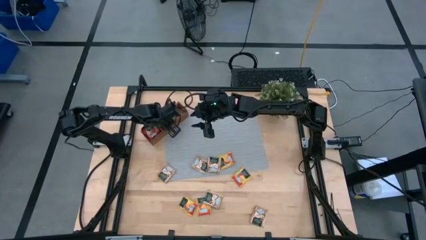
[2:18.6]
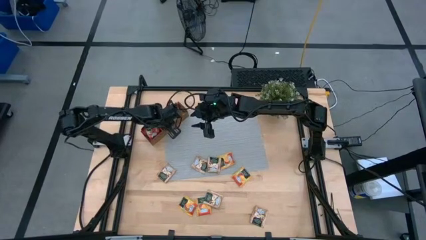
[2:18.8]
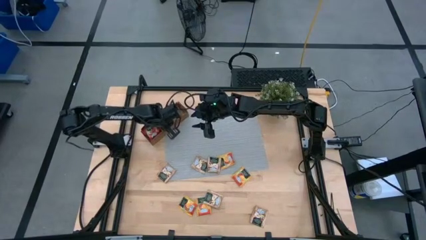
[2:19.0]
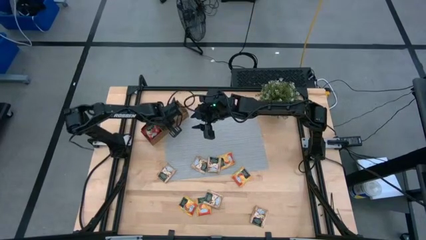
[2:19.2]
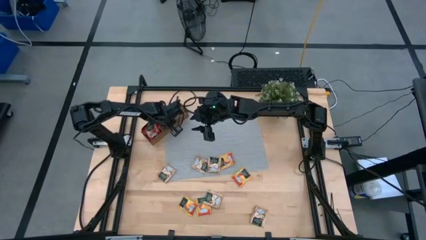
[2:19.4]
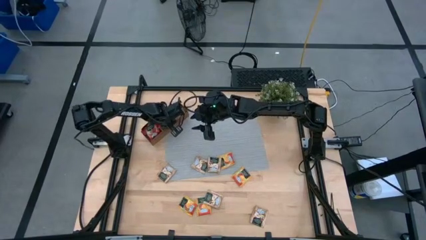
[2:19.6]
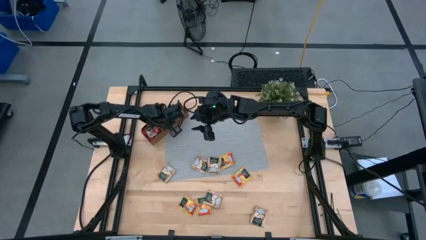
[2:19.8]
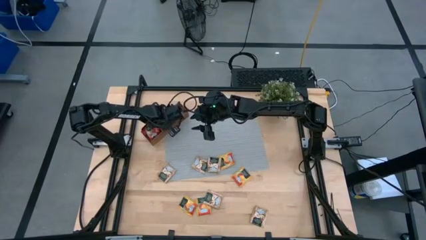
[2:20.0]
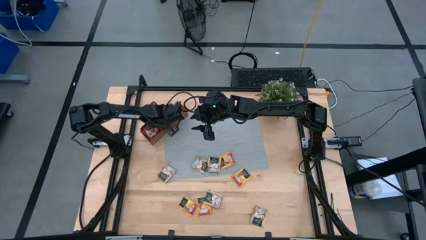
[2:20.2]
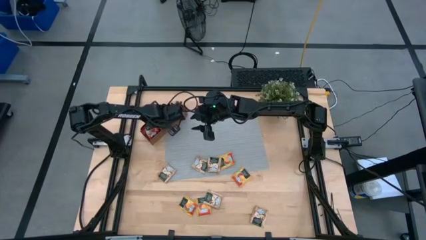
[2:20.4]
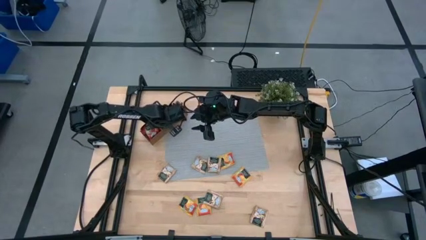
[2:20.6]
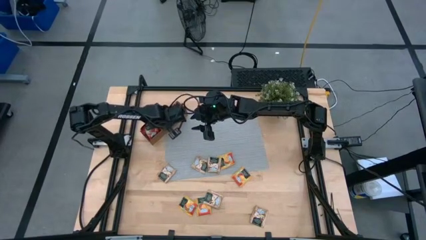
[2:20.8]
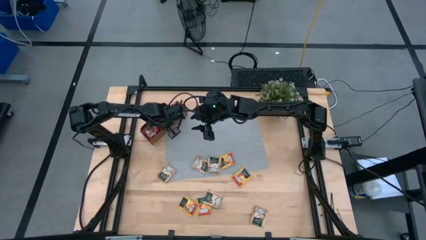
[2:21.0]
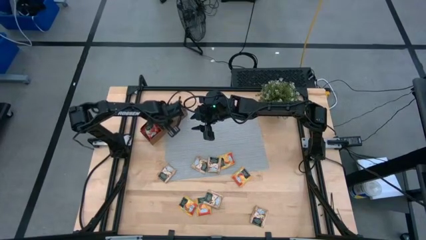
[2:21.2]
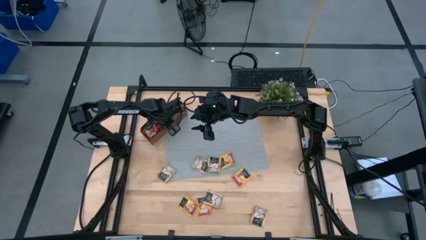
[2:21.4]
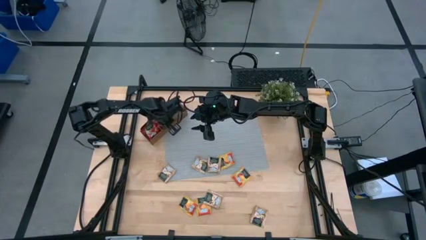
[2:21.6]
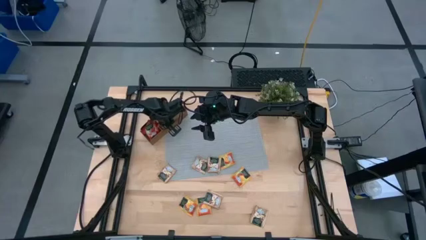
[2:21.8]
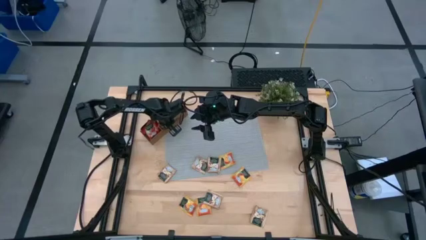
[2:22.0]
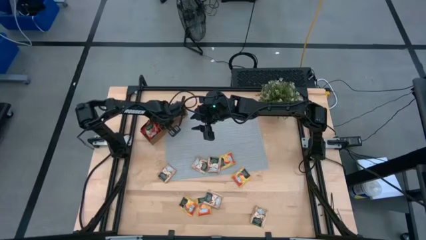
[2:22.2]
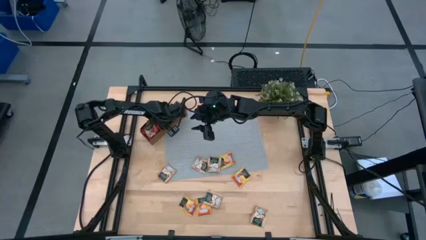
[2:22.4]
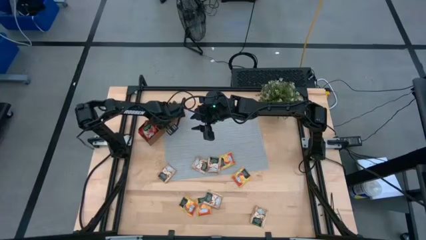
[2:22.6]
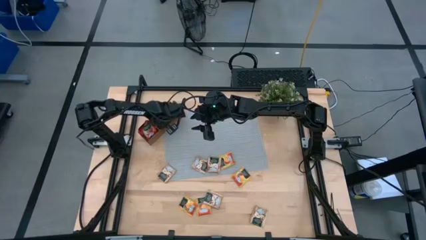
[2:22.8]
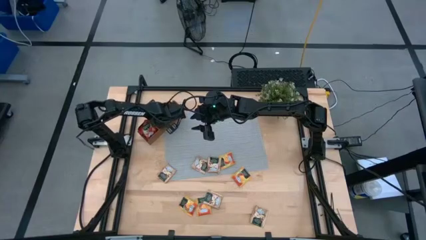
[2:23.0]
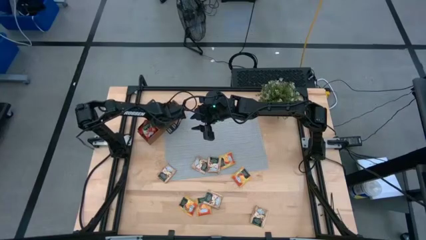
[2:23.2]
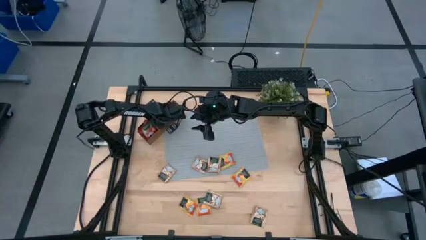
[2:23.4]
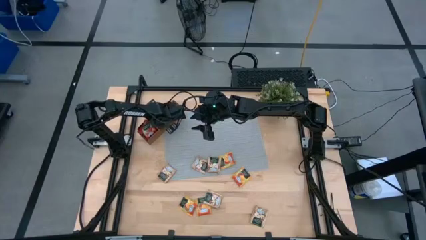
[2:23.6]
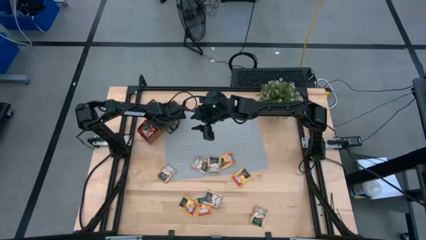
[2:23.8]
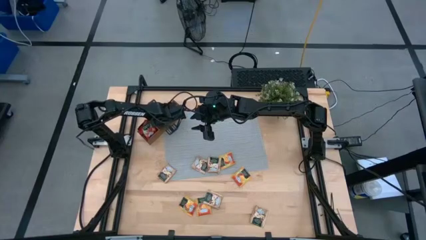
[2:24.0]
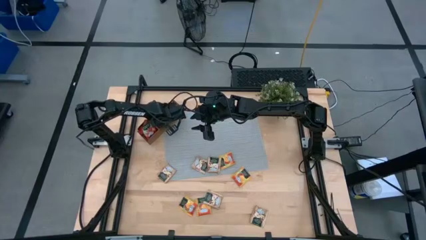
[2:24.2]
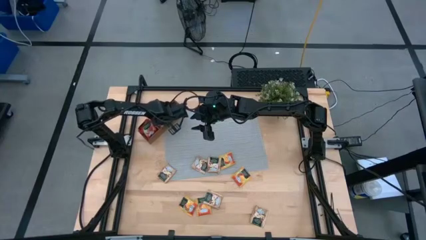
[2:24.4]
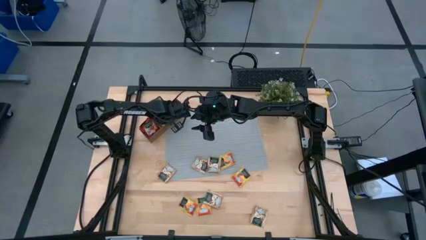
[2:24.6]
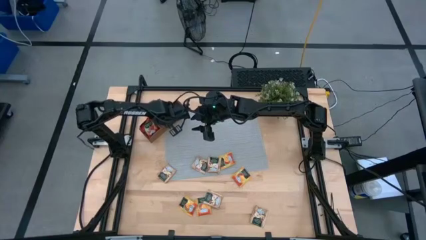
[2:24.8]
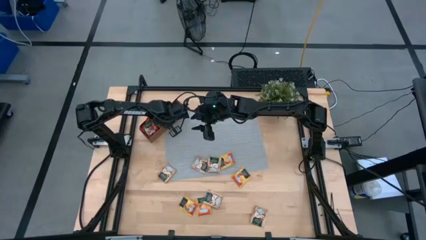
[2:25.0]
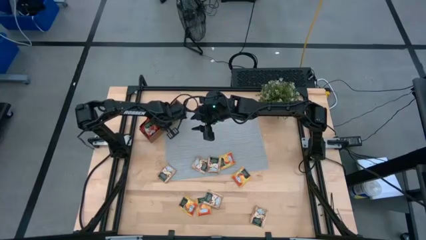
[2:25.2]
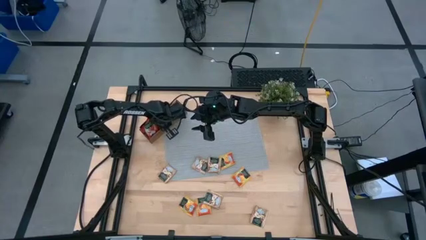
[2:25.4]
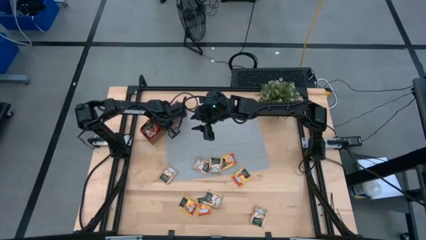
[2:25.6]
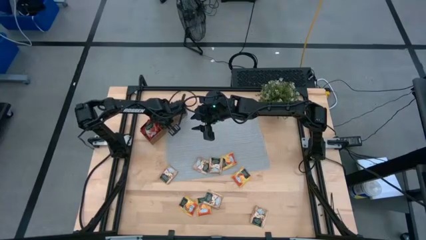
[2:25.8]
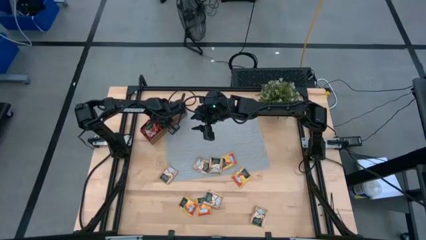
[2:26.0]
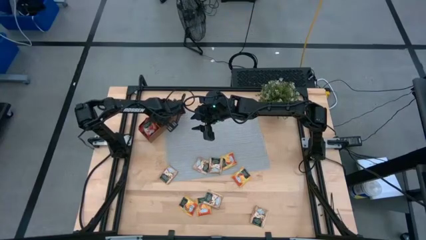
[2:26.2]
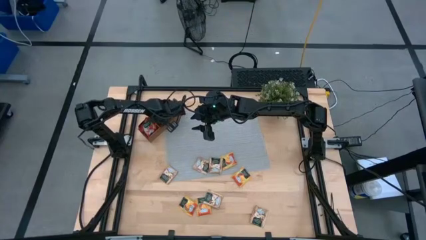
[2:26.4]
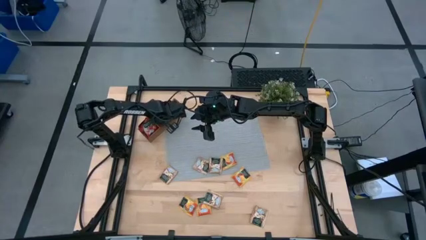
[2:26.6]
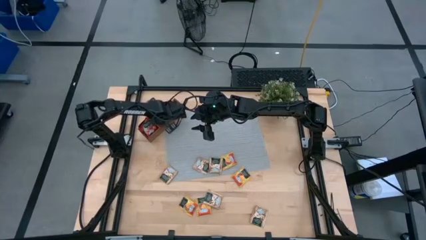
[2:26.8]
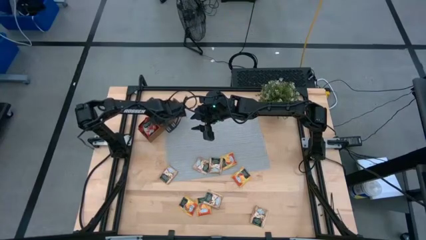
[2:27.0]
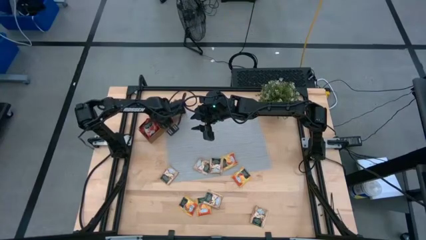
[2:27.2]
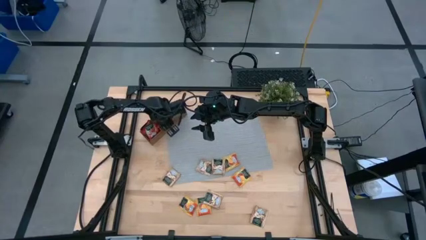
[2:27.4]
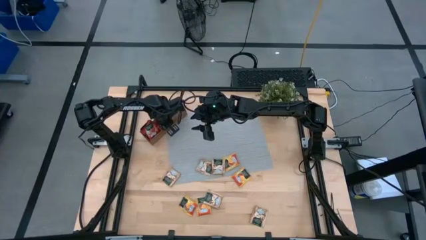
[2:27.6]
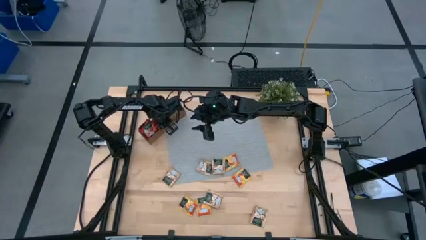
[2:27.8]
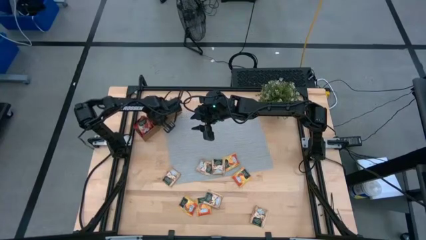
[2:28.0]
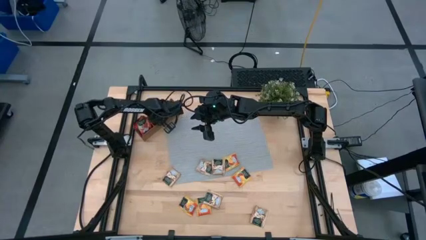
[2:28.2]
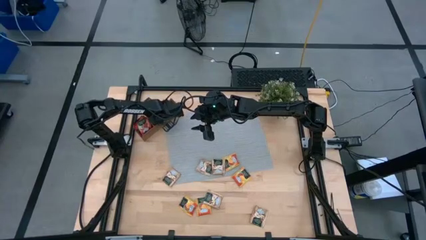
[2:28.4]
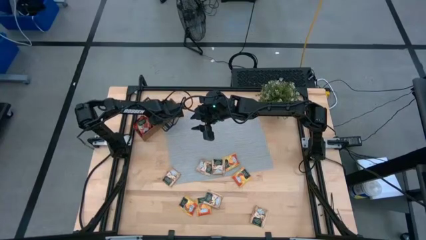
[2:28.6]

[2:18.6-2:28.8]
Task: Pick & Place Tea
Put the brown tea bag into the middle section of the wooden organizer

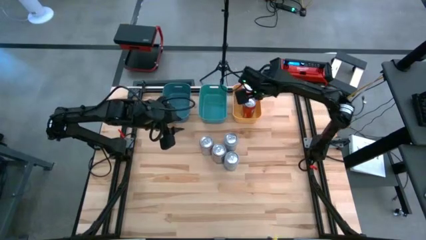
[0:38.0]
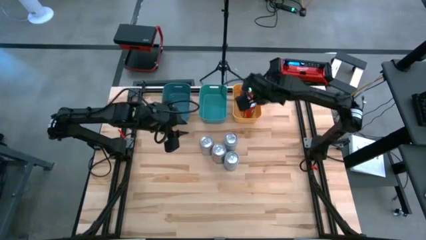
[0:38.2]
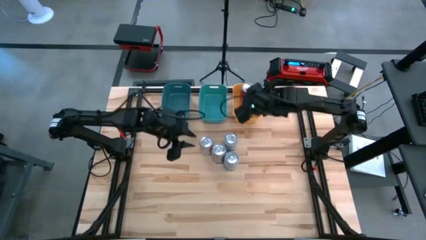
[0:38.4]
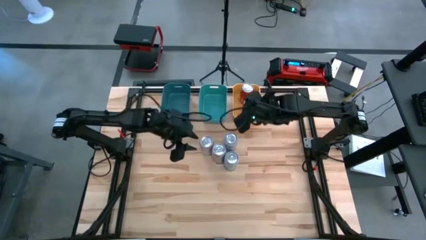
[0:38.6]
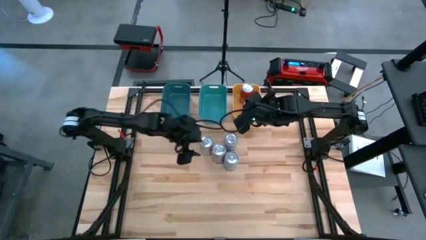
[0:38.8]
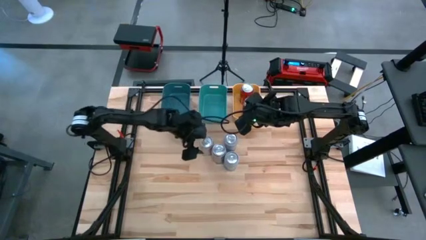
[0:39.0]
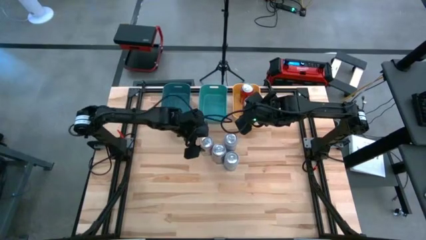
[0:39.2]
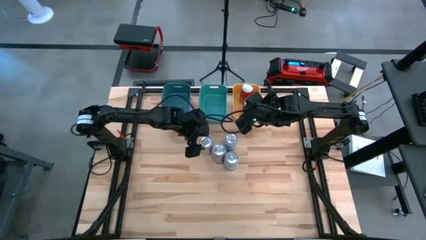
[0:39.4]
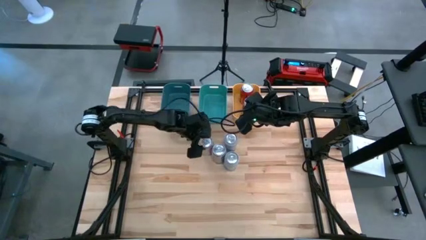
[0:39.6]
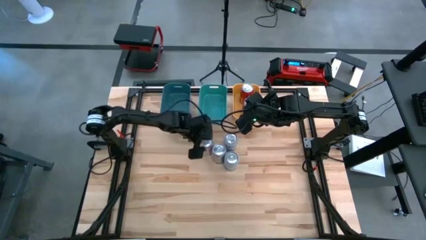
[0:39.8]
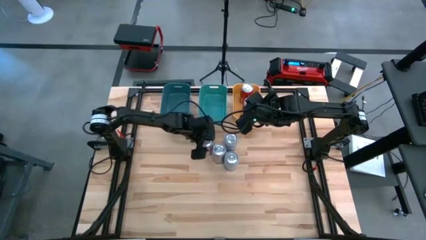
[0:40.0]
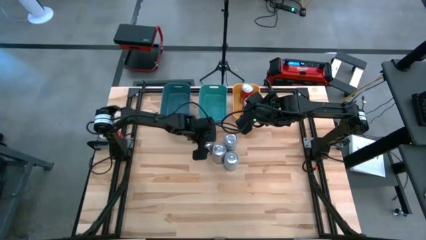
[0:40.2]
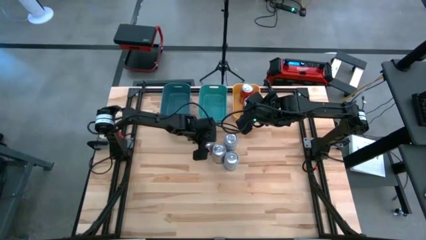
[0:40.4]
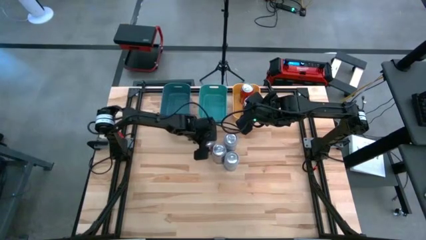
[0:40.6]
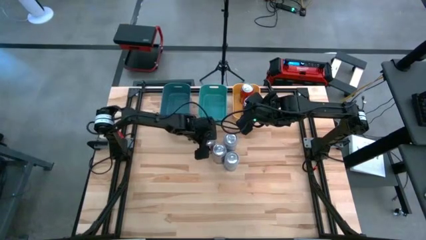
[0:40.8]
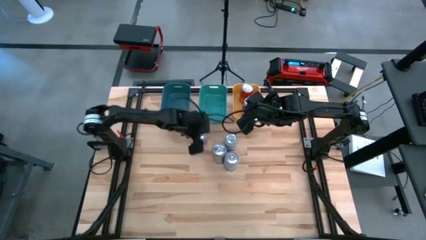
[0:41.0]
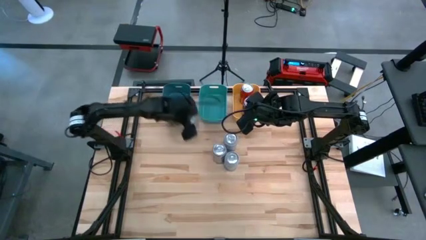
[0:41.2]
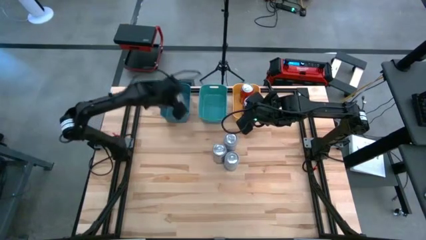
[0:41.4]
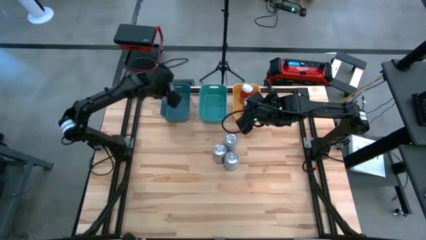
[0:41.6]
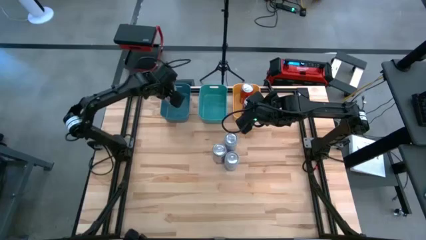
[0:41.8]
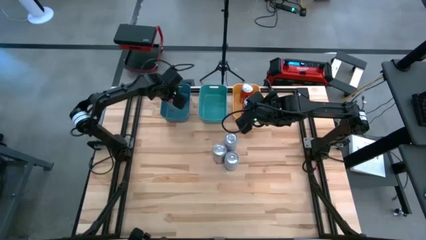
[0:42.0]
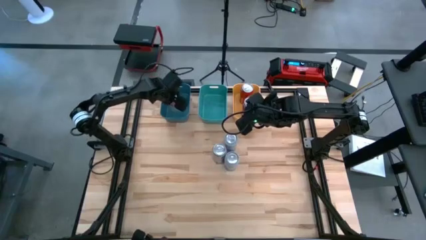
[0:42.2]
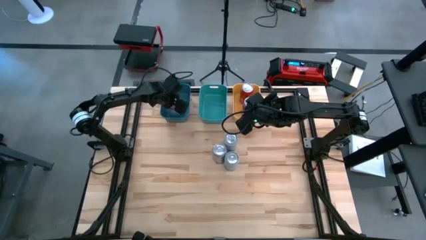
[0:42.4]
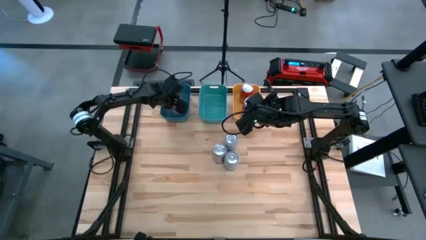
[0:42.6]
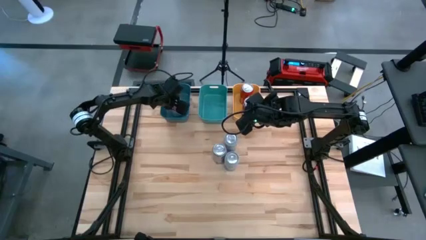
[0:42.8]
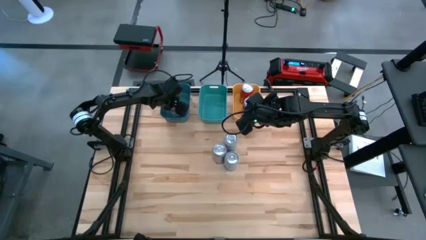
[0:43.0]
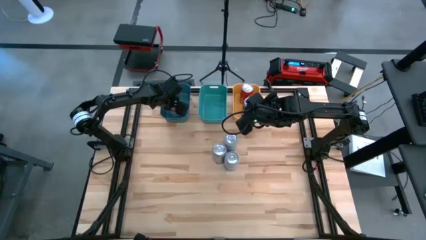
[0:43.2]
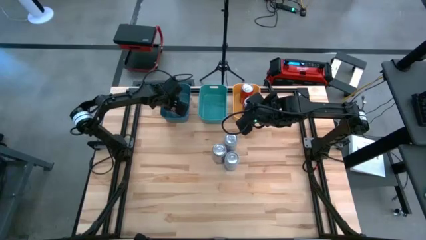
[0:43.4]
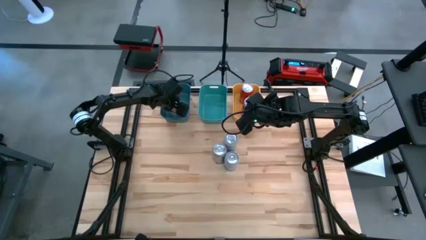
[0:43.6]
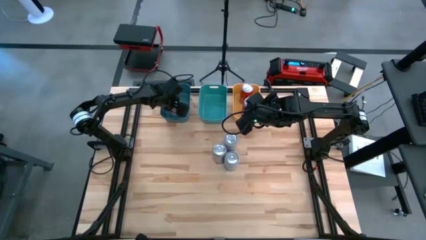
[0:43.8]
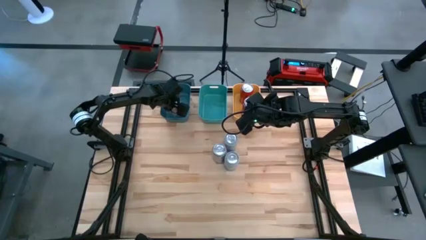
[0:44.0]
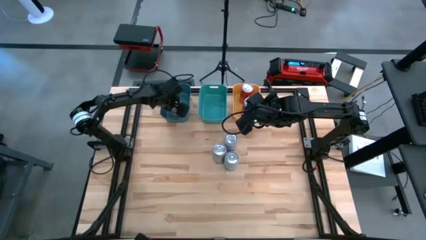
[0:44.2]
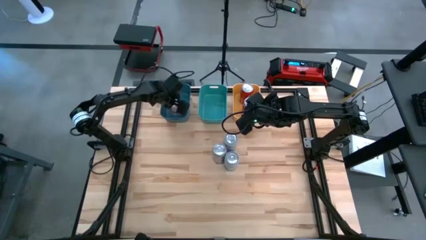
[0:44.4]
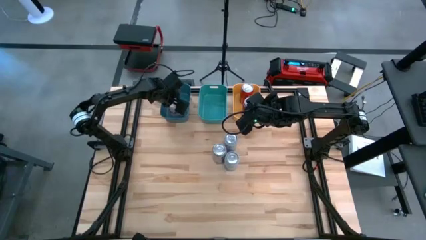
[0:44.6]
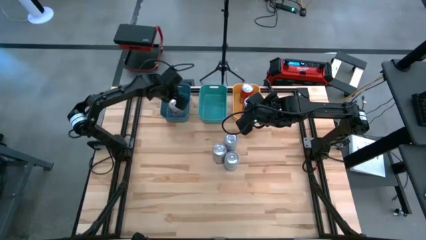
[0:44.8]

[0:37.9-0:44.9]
Task: Sort soda cans
Put the left red-silver soda can into the blue bin
